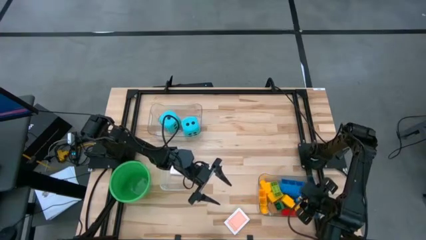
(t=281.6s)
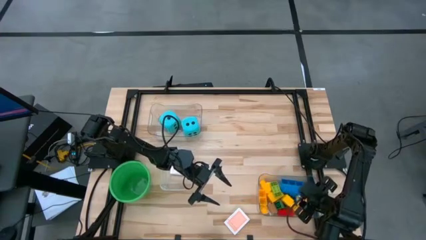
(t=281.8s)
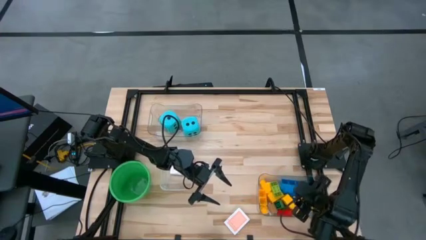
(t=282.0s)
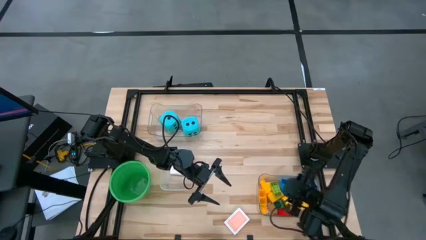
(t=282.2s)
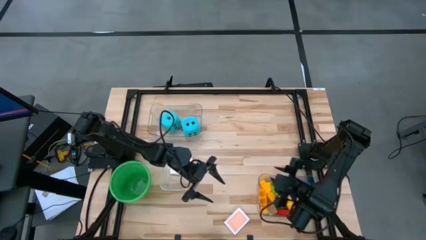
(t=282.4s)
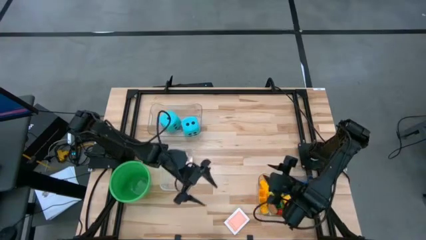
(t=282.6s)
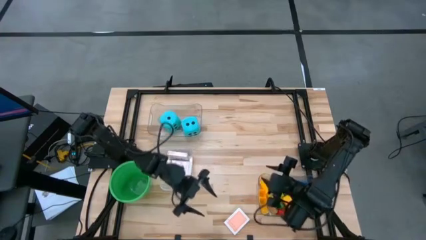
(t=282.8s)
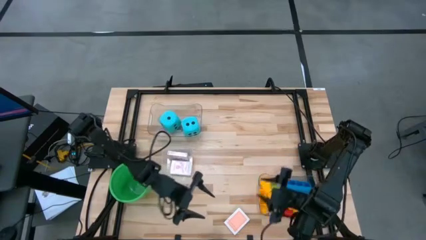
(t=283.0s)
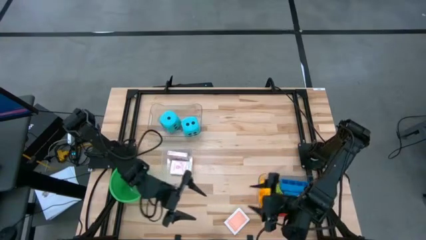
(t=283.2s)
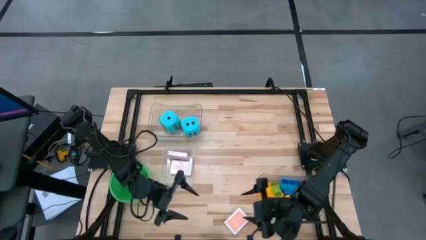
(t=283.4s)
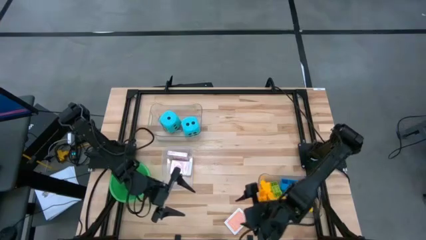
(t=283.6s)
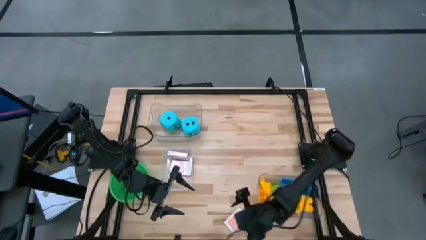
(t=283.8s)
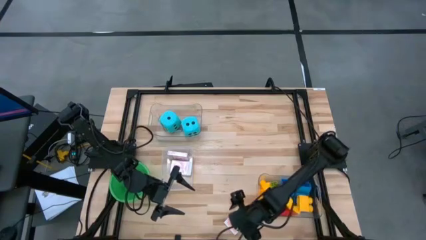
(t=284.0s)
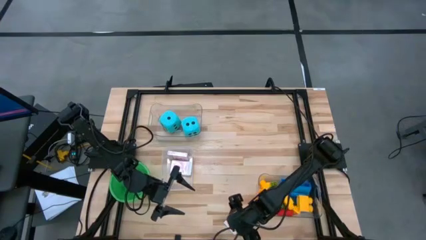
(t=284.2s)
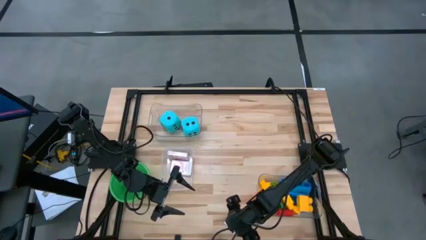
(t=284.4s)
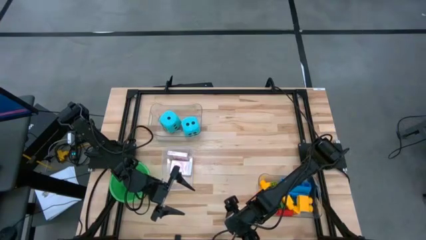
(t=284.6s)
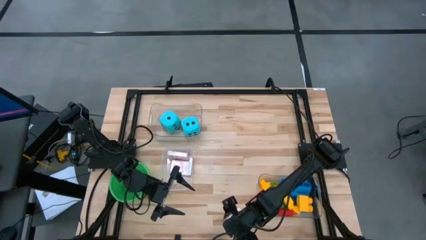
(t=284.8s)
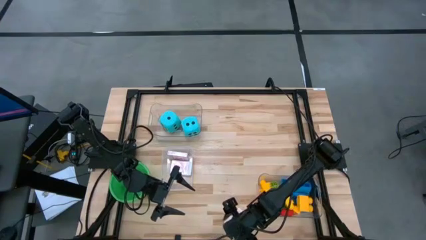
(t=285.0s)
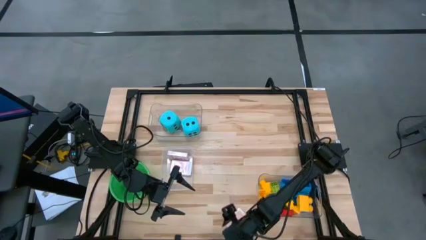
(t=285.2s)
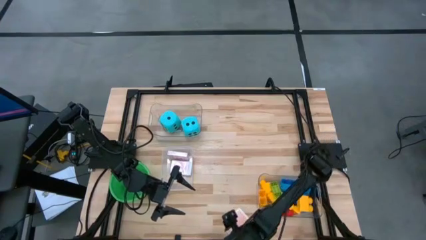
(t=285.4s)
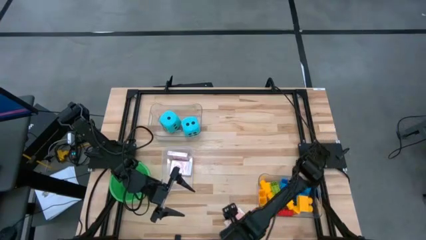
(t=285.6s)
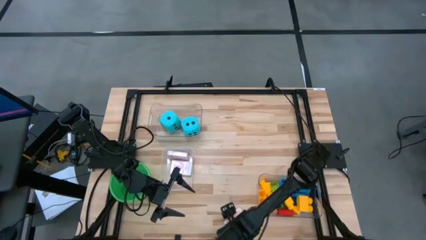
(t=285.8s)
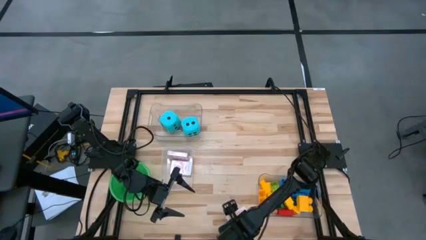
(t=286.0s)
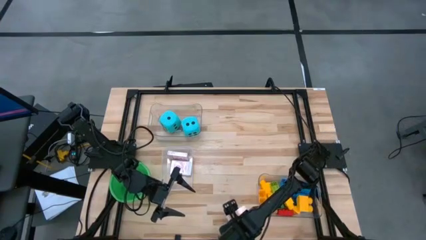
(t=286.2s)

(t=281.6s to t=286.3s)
Task: Pick & Place Toys
Put the orange playing card box into the bottom left transparent bin

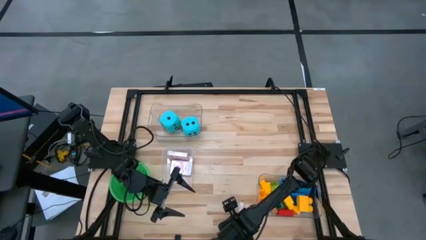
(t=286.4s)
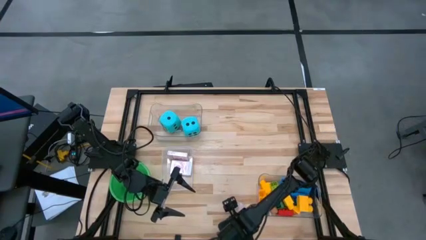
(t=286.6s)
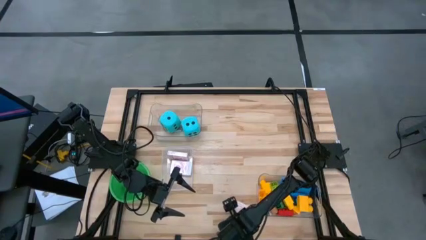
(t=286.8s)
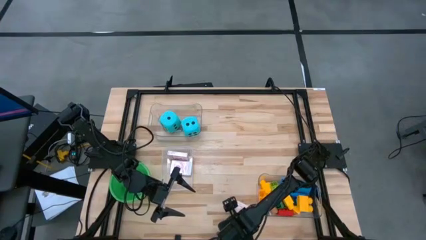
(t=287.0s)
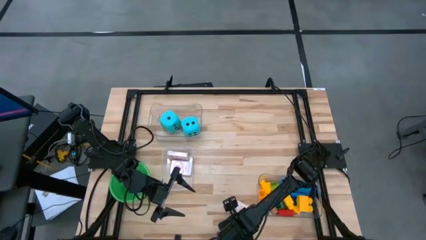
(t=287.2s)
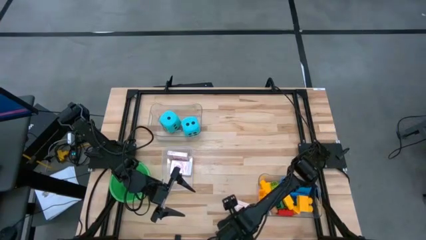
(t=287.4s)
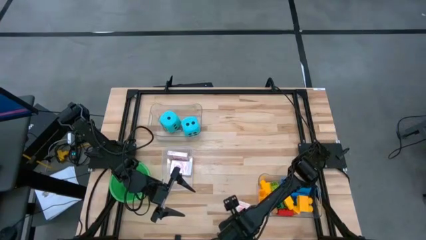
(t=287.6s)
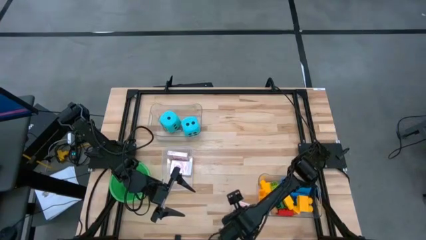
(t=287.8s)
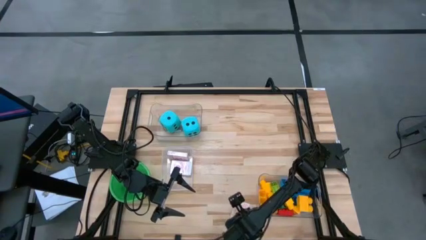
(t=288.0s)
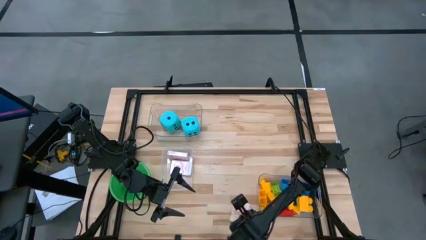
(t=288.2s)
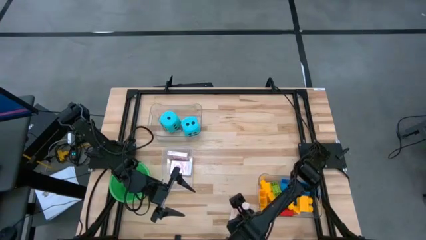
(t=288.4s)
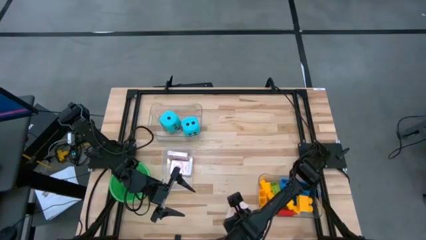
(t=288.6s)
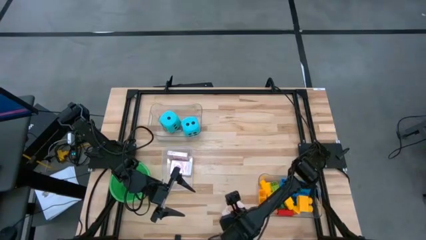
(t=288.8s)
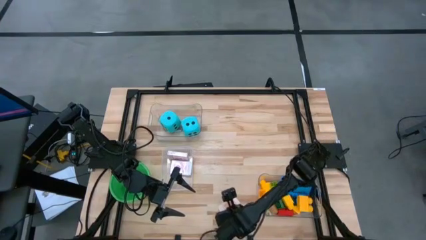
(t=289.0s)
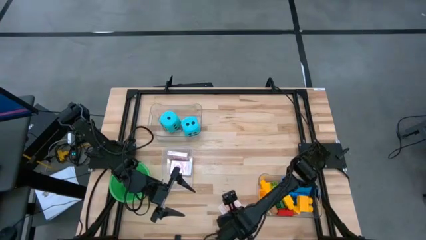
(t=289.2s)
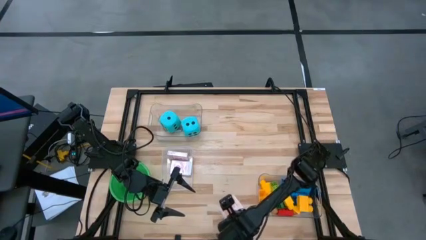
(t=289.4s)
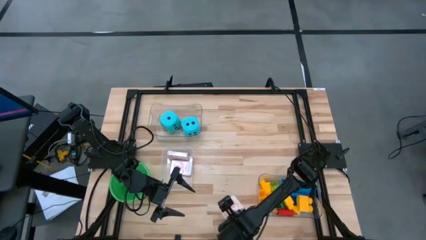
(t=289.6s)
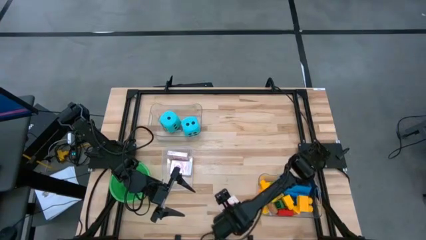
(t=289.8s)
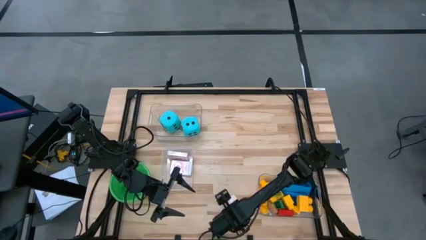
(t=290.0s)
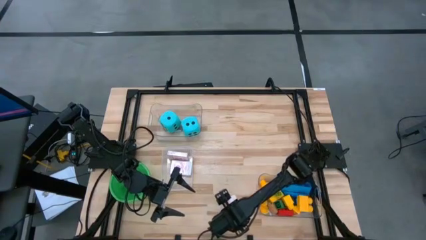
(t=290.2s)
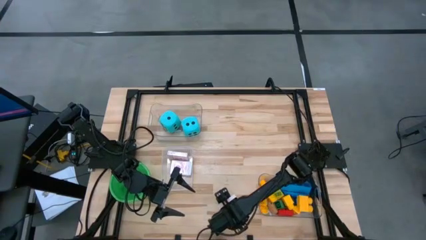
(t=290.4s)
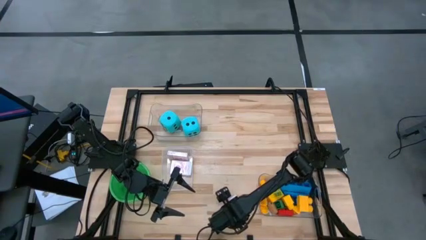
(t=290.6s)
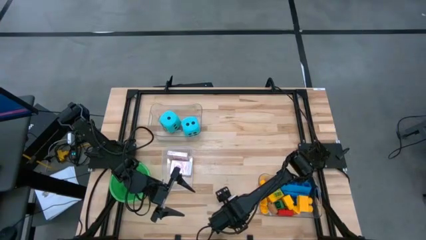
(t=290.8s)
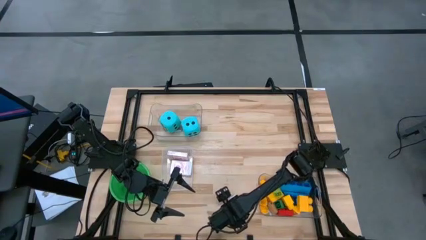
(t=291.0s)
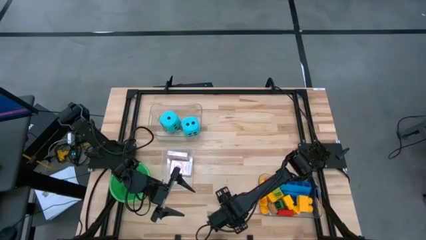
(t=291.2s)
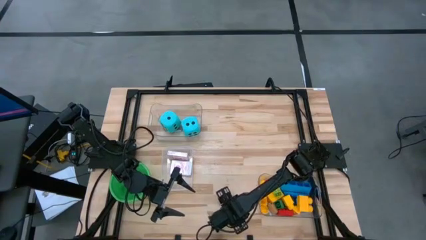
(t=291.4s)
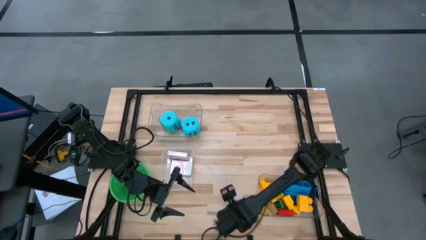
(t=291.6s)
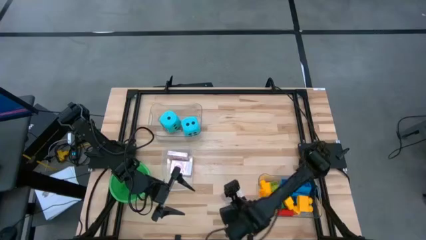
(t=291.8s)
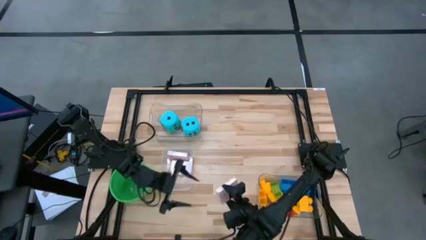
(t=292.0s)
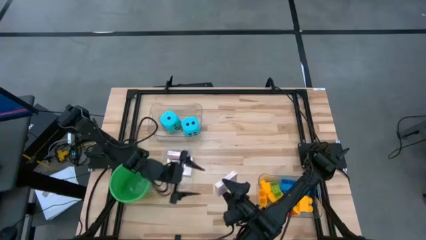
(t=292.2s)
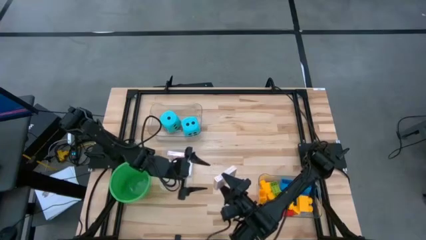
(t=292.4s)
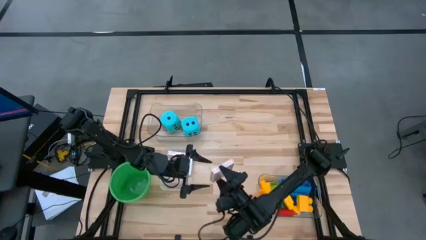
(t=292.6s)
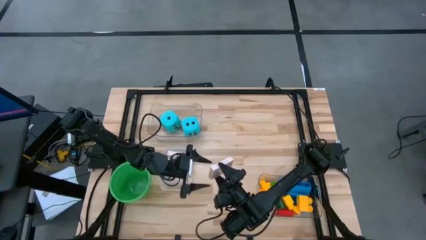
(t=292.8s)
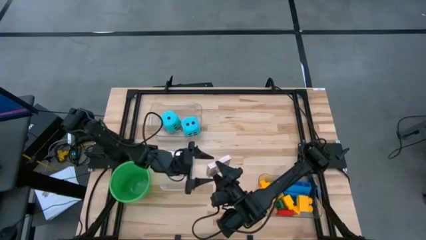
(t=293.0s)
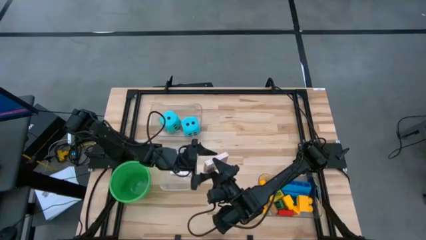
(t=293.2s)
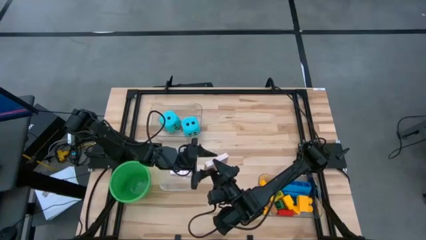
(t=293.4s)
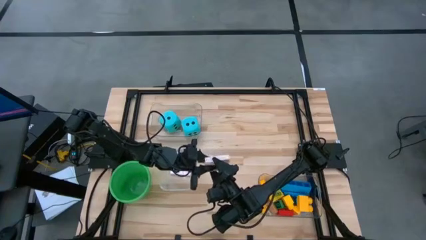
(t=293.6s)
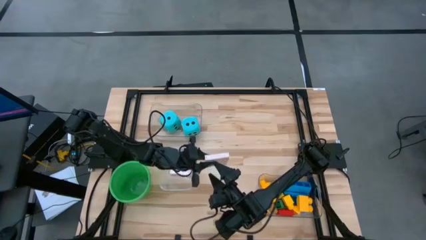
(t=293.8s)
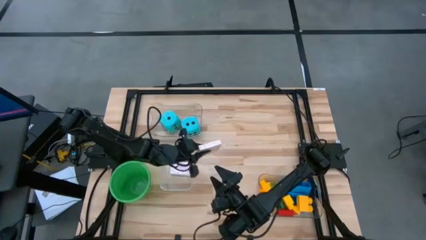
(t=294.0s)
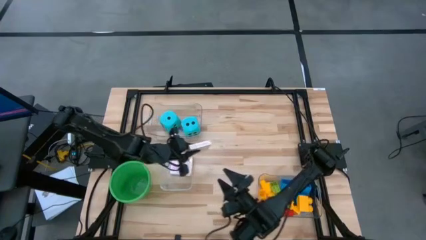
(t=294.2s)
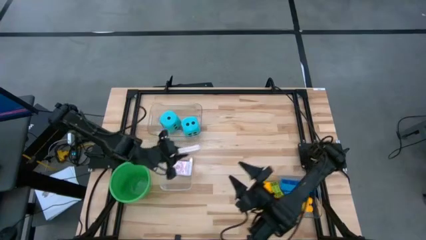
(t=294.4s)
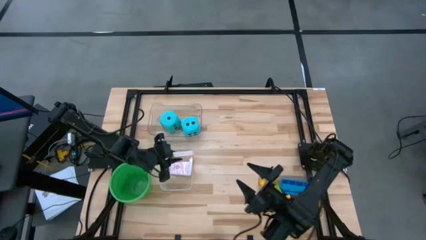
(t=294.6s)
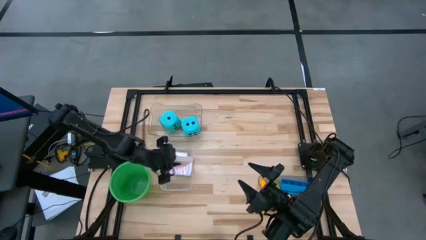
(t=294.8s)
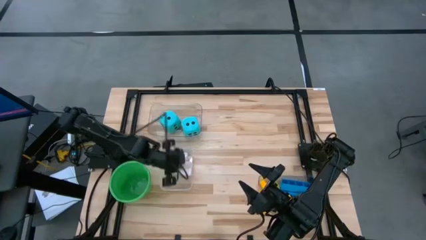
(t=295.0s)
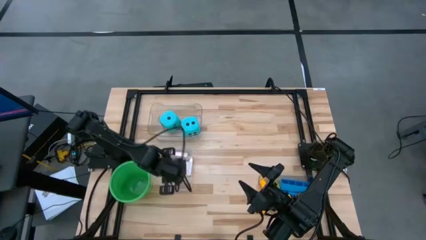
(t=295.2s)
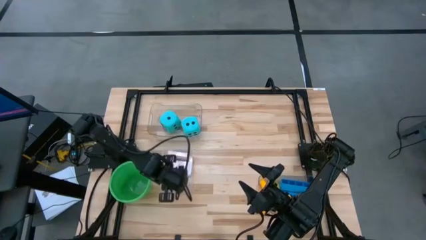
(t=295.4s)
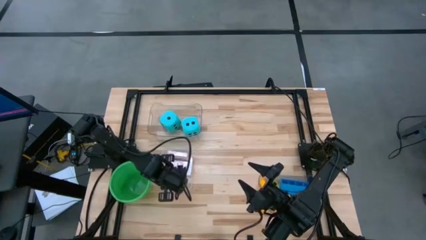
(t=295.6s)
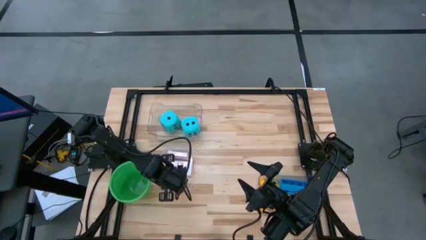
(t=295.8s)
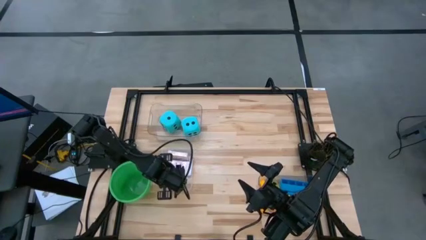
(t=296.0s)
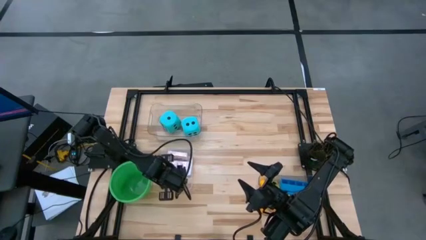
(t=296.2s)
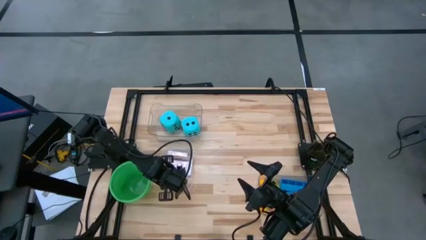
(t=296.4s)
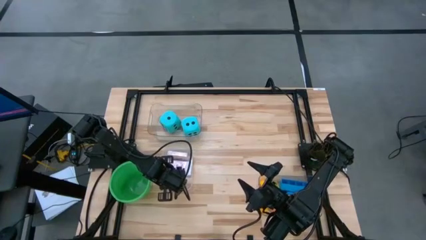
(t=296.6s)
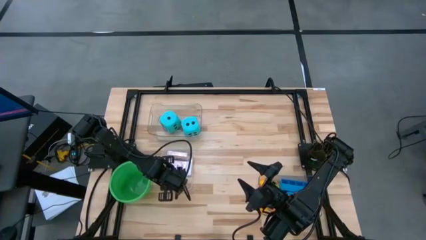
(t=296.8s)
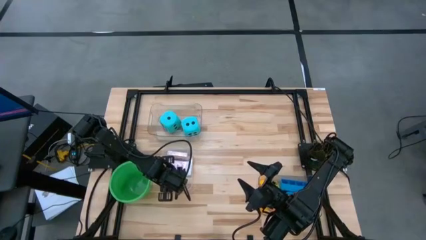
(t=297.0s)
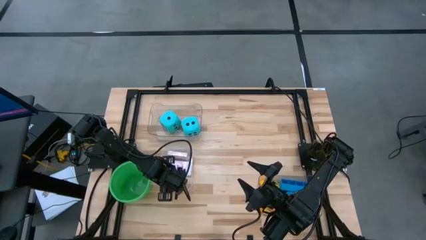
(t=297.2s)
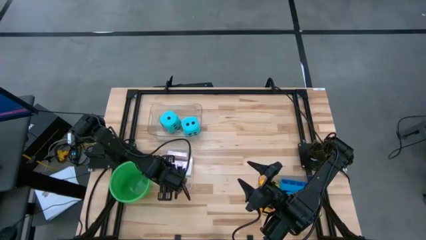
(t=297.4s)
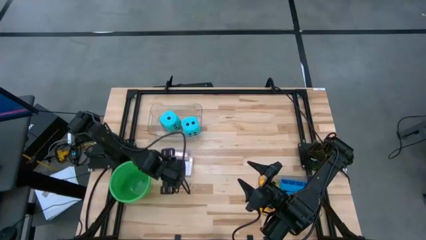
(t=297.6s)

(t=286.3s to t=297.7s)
Put the orange playing card box into the bottom left transparent bin
